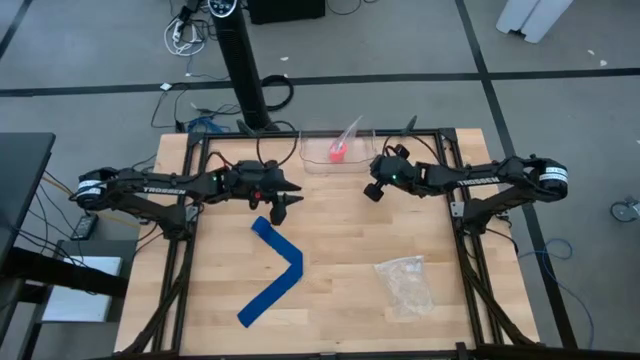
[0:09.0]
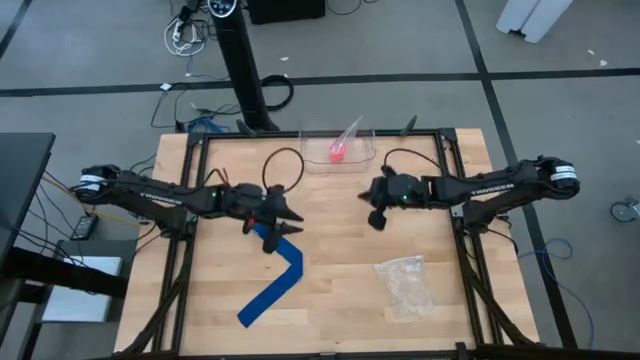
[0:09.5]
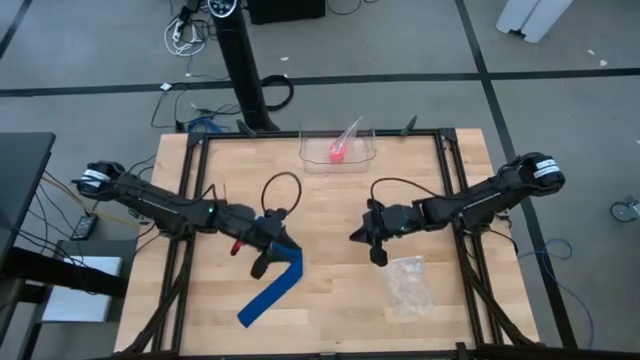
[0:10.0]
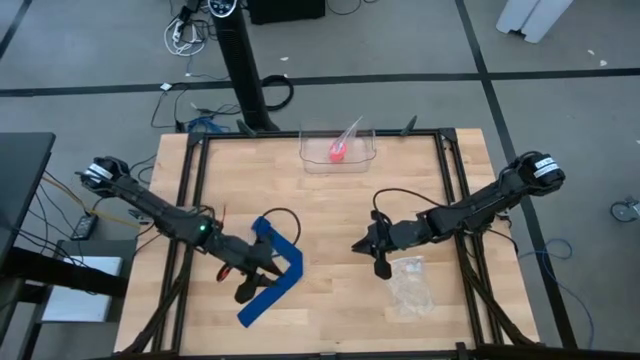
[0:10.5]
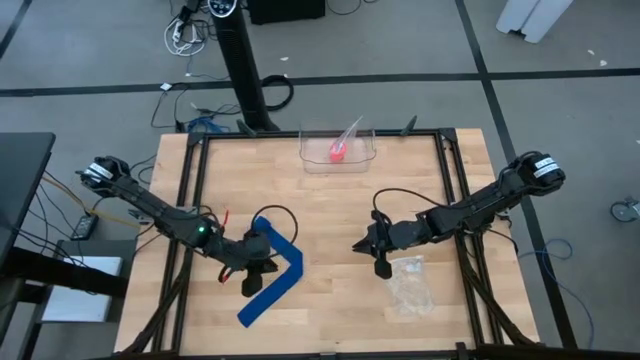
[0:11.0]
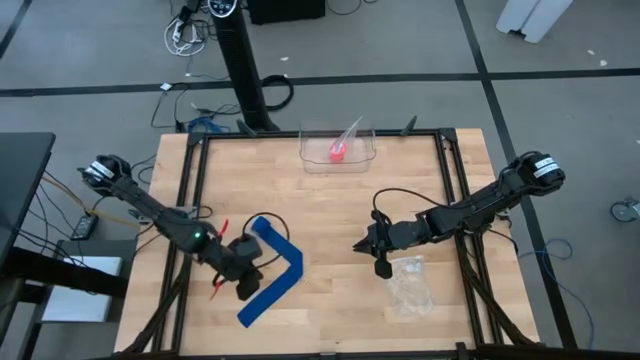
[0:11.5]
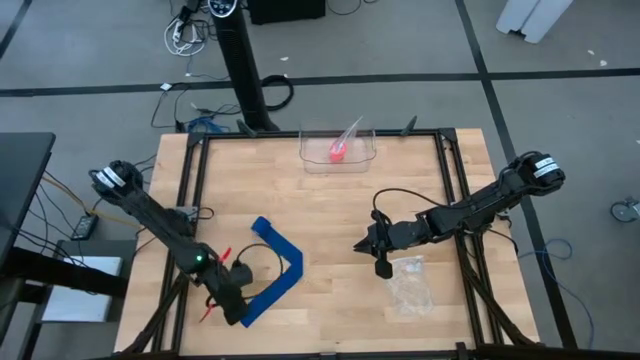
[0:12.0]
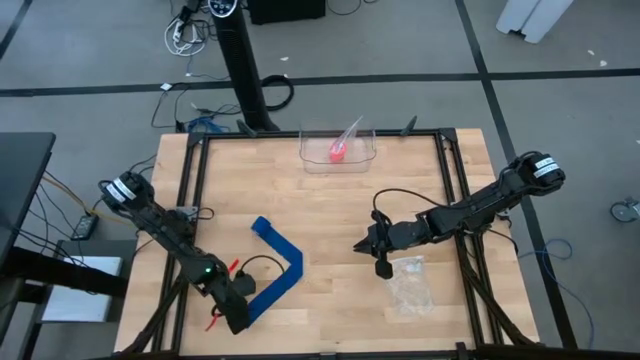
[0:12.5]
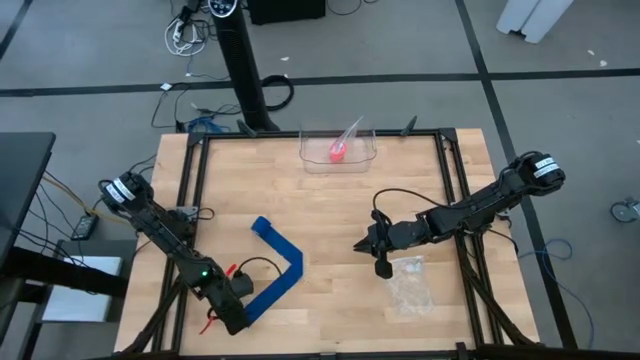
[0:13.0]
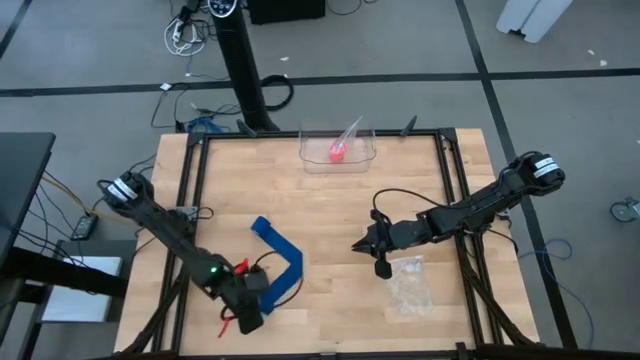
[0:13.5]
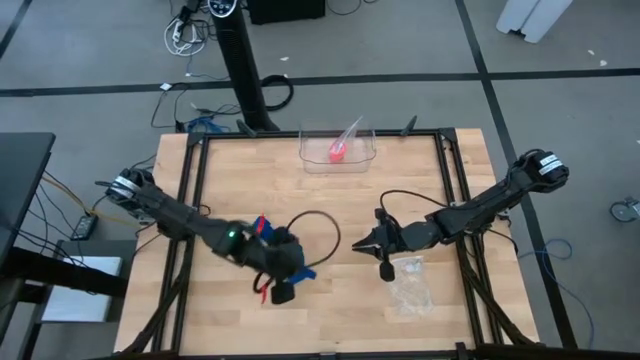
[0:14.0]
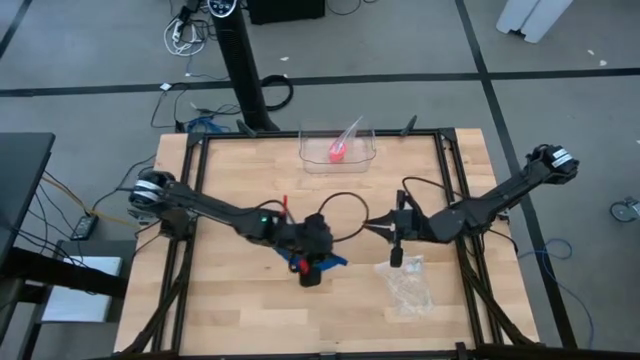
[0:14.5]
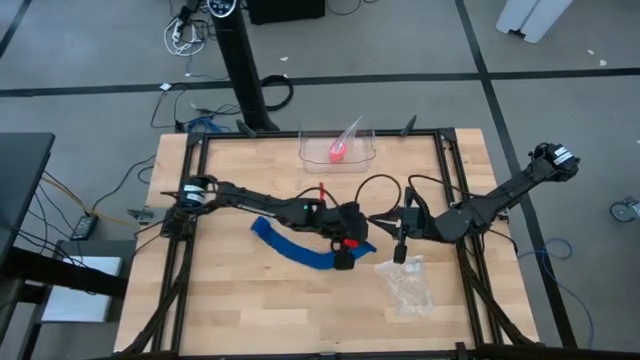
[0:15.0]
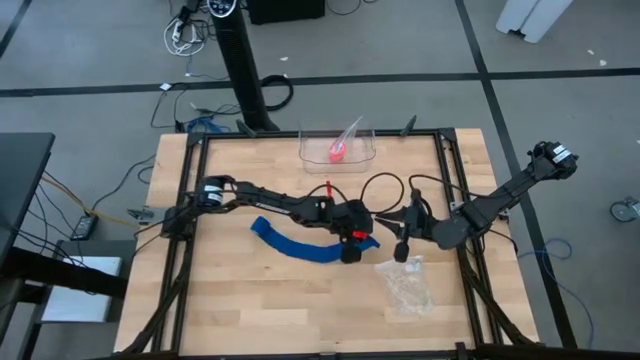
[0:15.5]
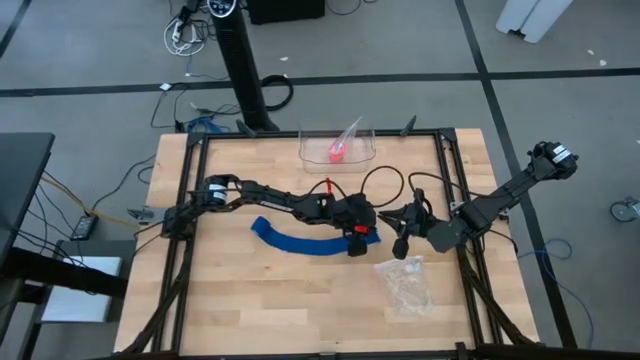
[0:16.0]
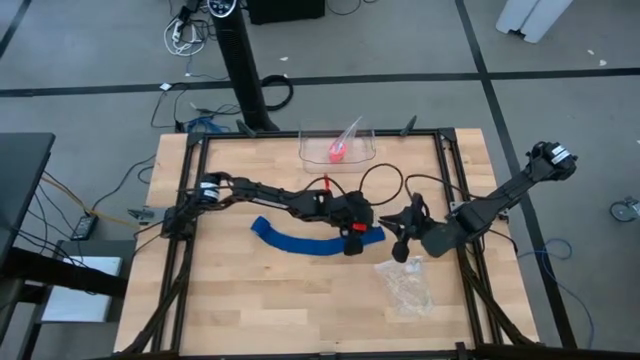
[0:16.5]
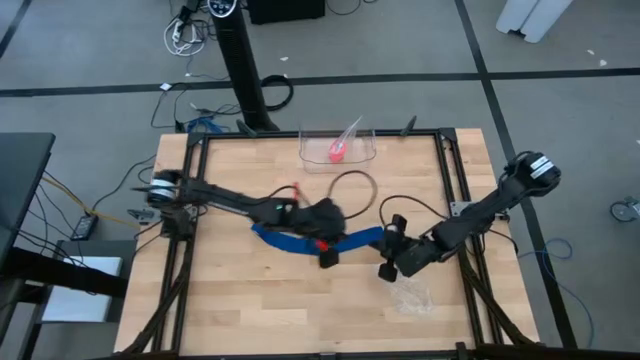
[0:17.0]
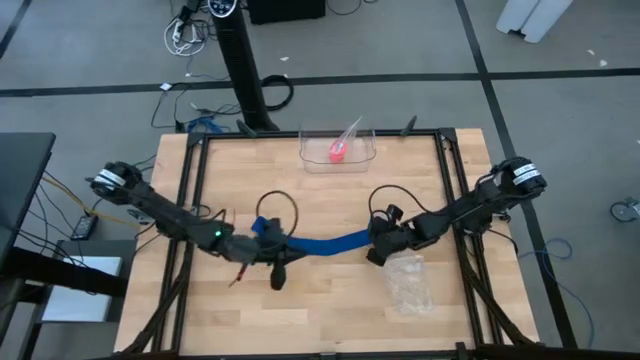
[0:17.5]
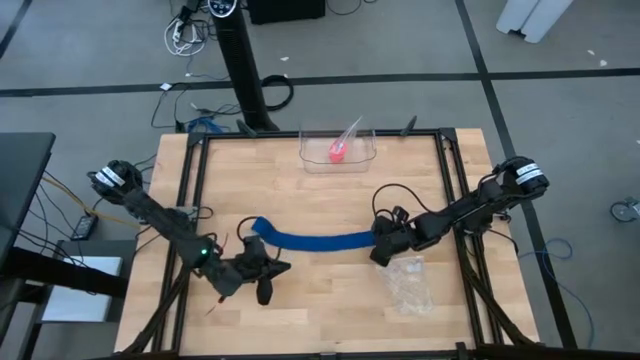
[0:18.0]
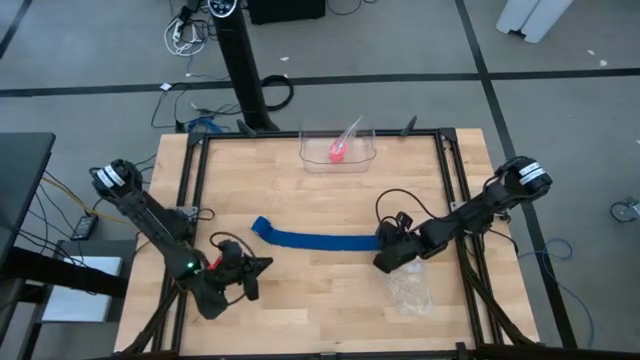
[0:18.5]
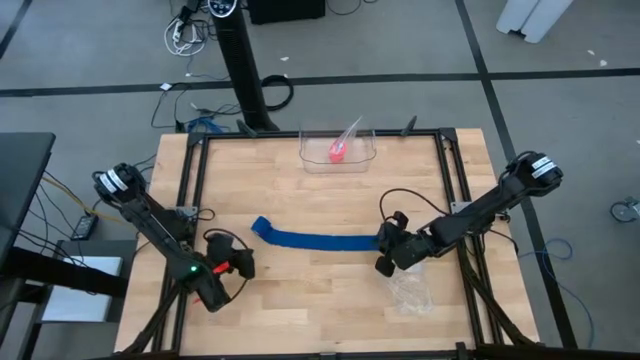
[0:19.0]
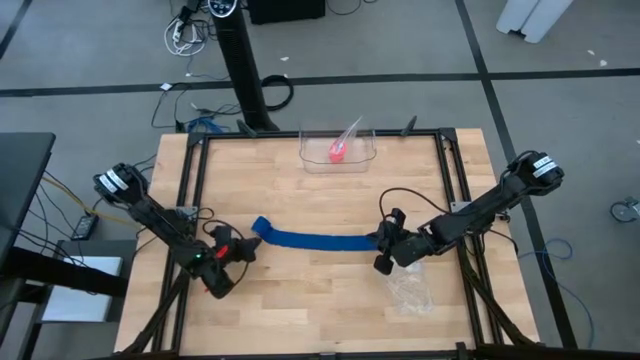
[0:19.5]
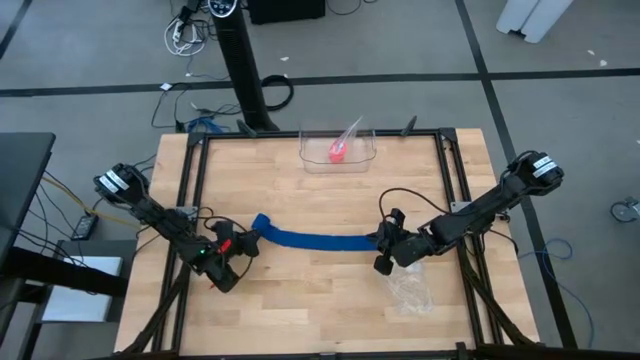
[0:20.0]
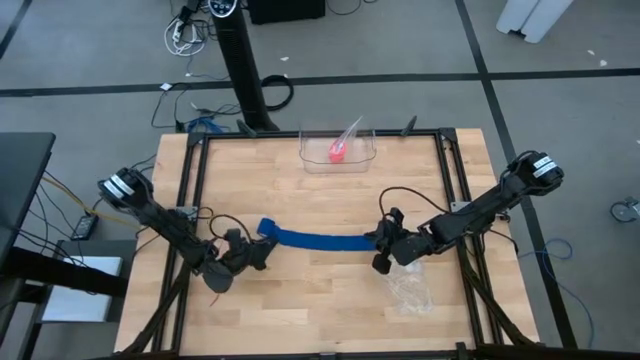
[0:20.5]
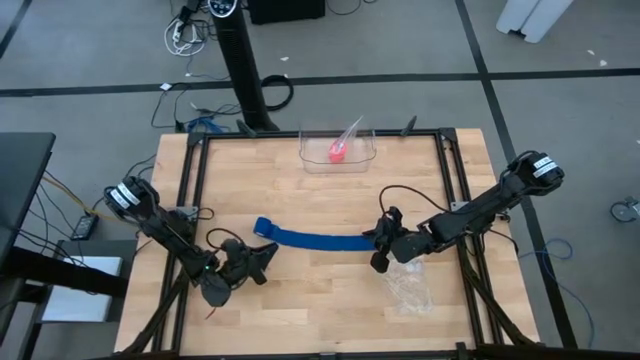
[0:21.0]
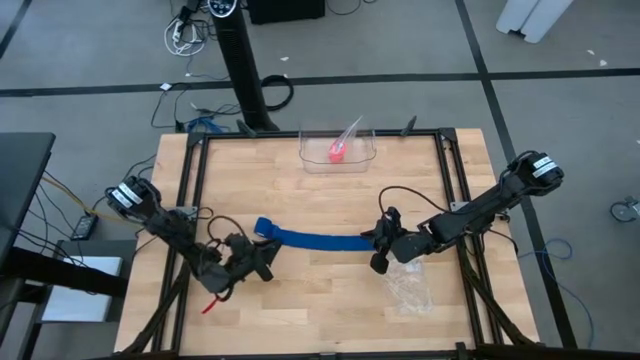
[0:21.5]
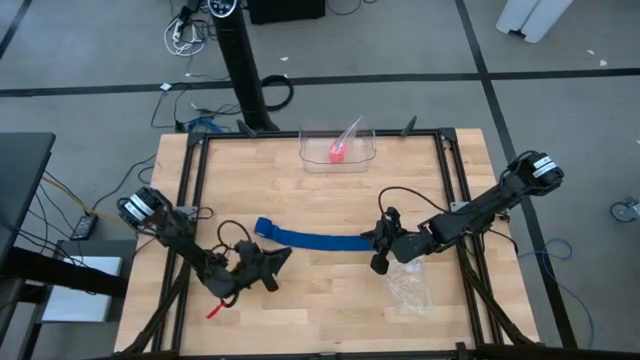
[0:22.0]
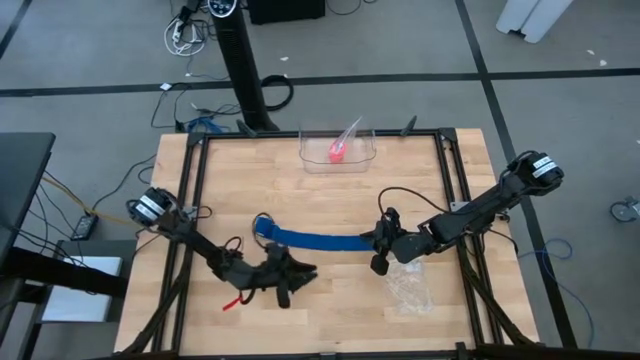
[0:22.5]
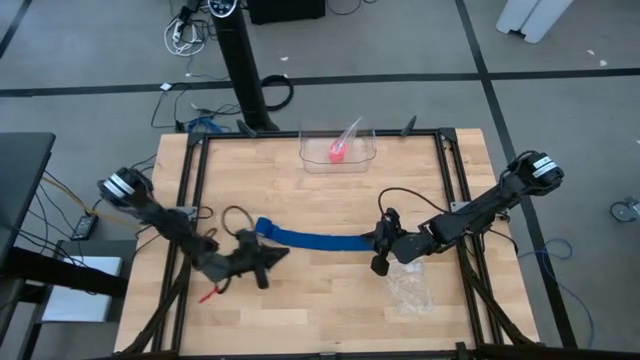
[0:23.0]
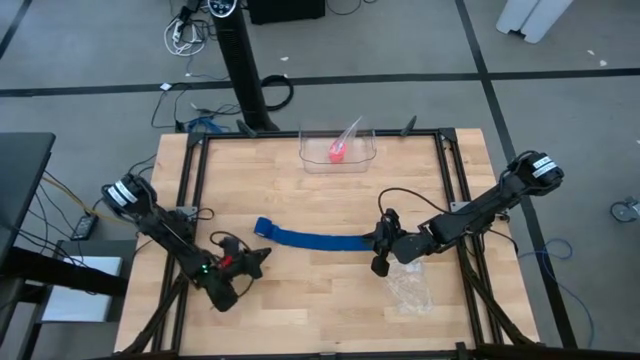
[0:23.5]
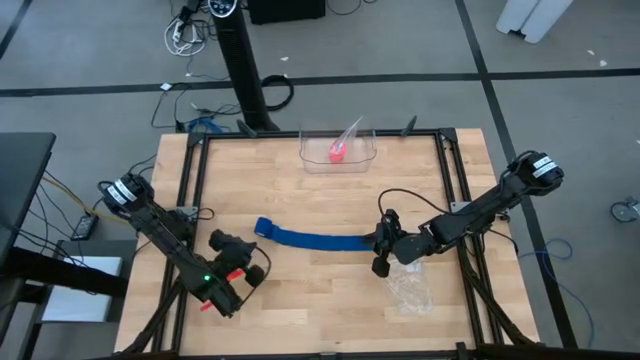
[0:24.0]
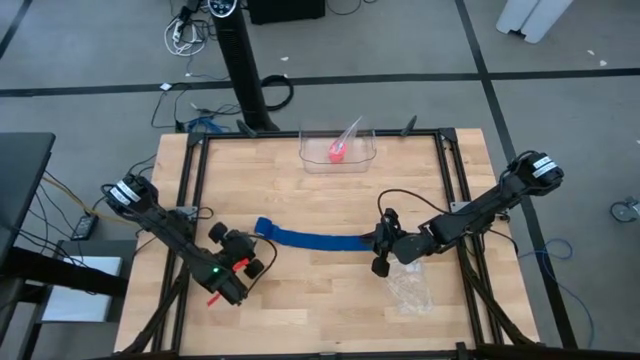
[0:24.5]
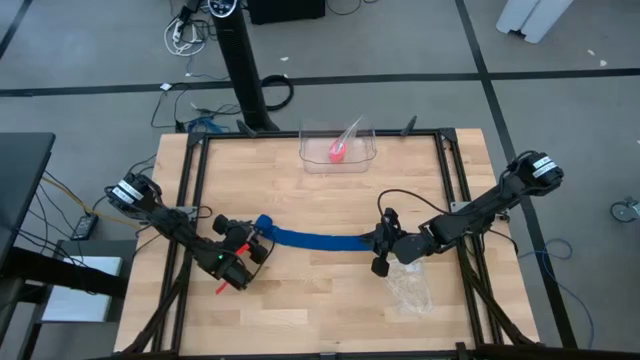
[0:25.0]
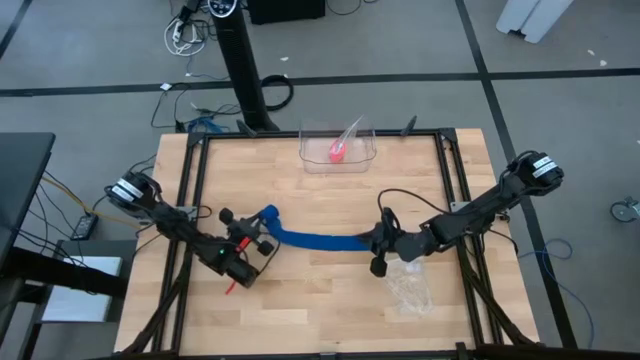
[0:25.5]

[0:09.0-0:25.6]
Task: Roll bandage
Roll the blue bandage
